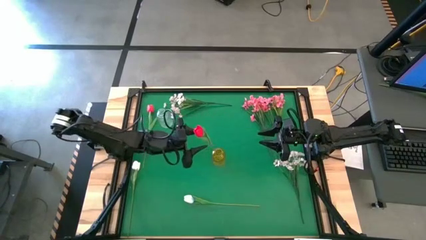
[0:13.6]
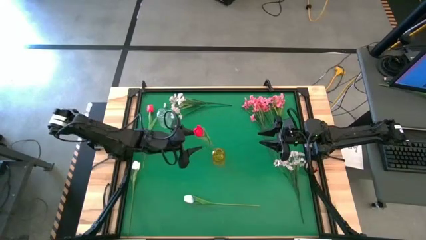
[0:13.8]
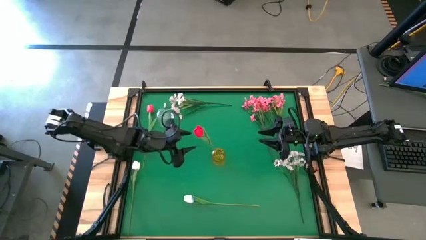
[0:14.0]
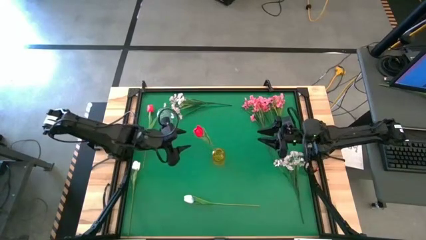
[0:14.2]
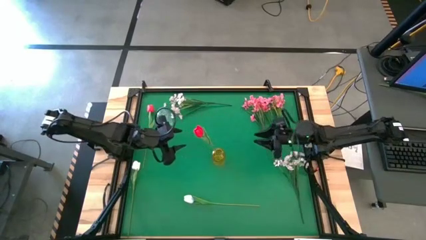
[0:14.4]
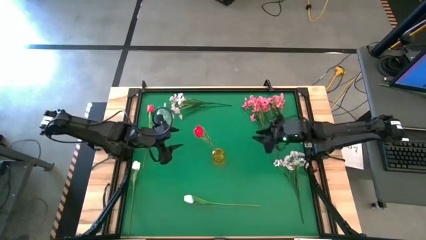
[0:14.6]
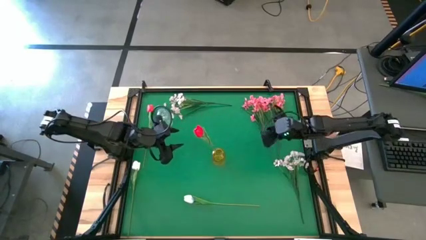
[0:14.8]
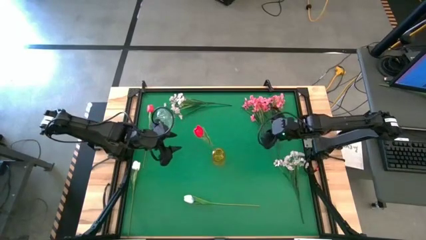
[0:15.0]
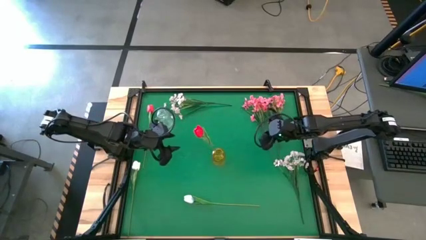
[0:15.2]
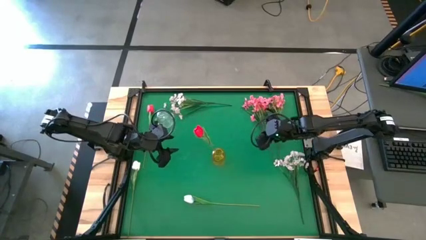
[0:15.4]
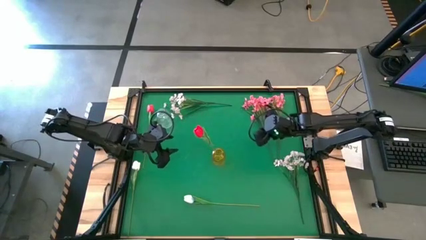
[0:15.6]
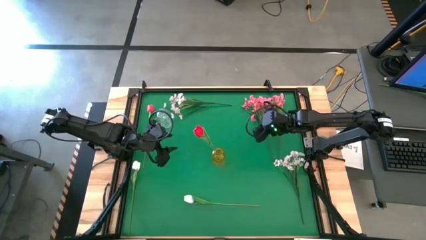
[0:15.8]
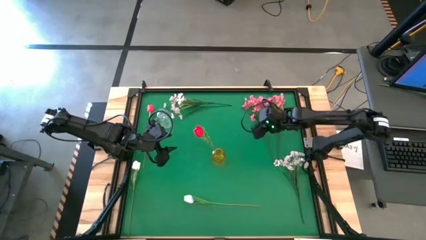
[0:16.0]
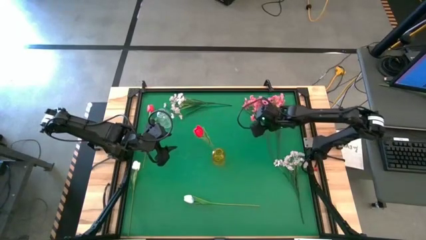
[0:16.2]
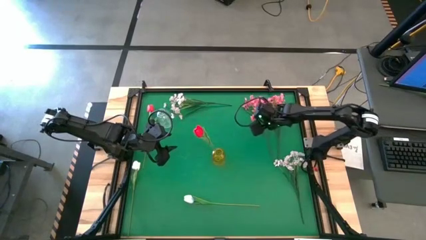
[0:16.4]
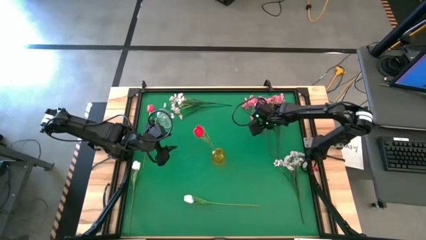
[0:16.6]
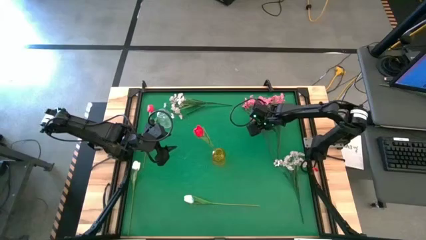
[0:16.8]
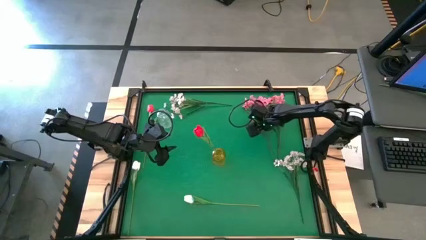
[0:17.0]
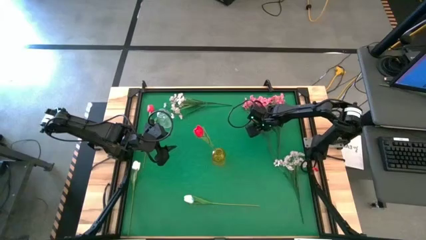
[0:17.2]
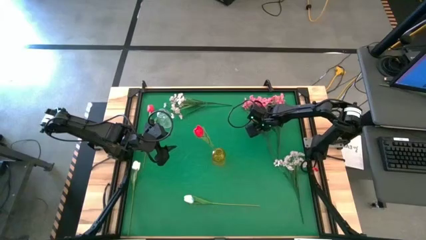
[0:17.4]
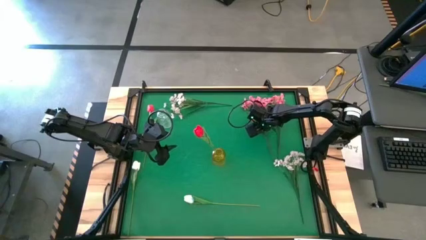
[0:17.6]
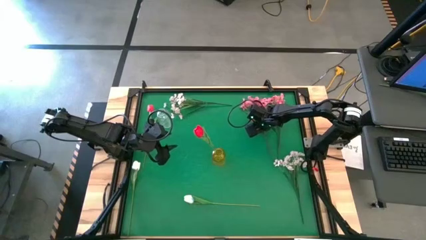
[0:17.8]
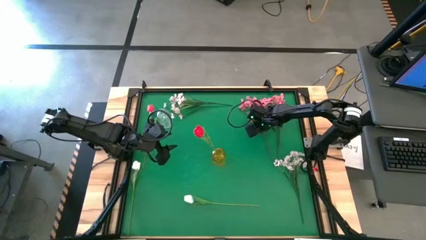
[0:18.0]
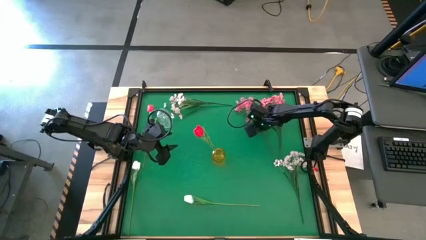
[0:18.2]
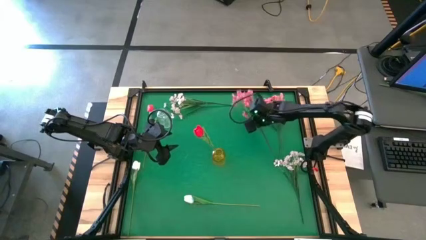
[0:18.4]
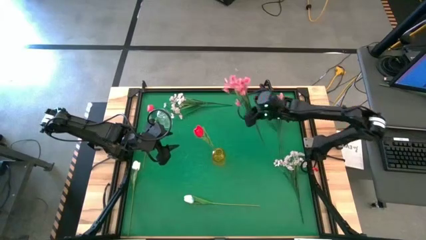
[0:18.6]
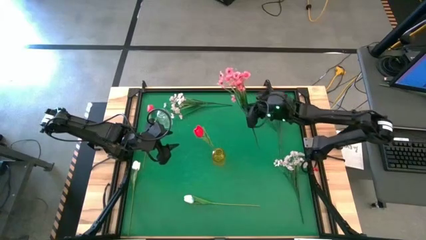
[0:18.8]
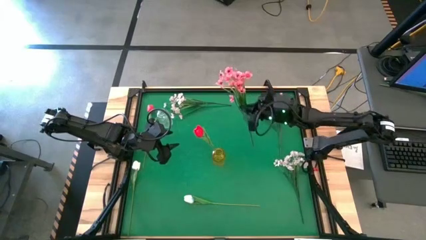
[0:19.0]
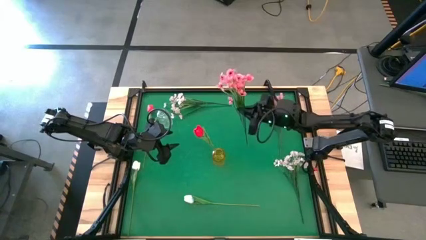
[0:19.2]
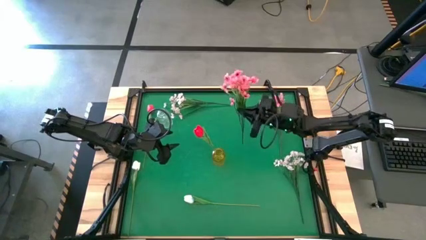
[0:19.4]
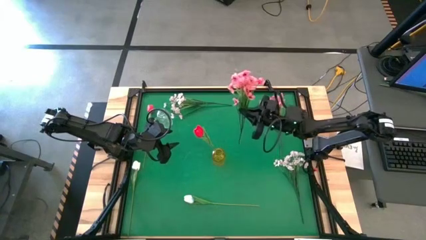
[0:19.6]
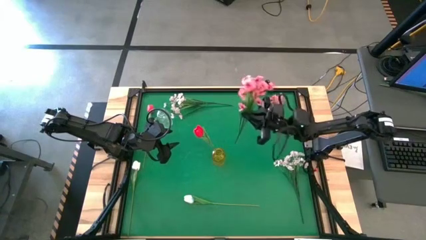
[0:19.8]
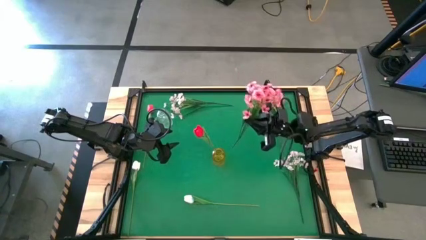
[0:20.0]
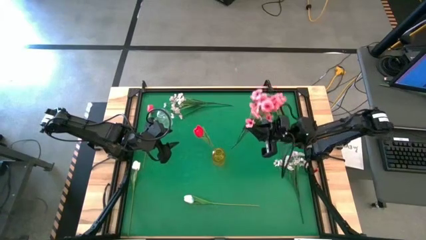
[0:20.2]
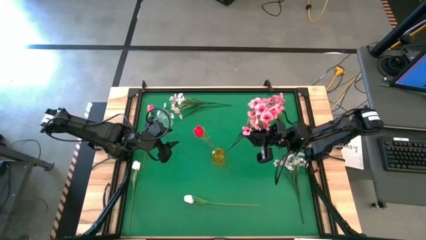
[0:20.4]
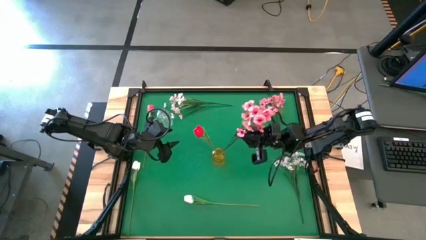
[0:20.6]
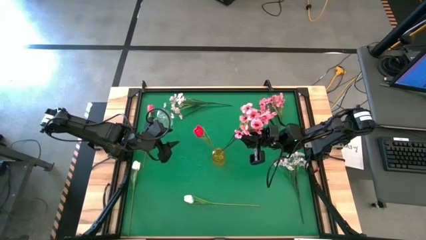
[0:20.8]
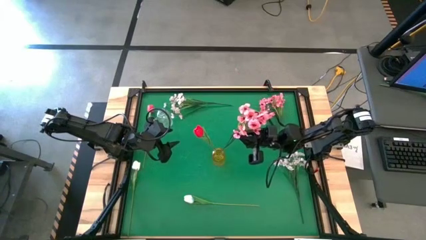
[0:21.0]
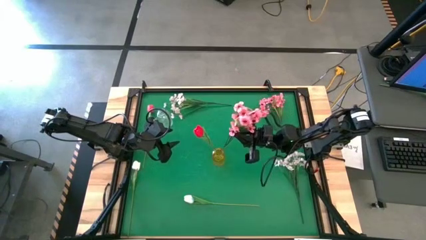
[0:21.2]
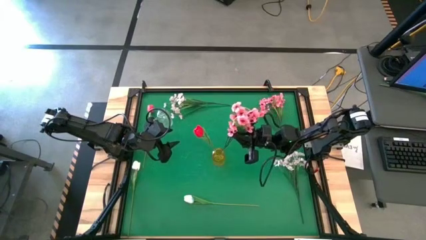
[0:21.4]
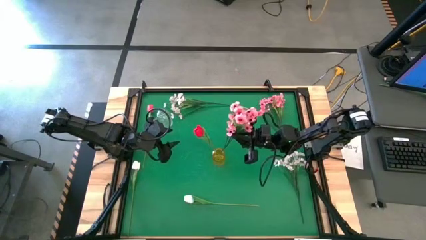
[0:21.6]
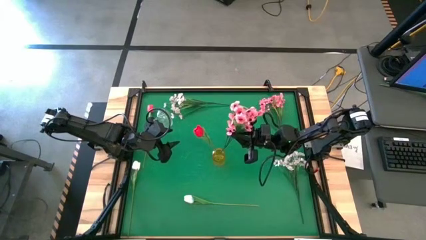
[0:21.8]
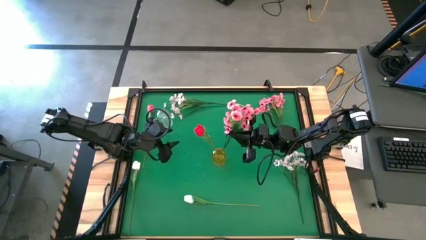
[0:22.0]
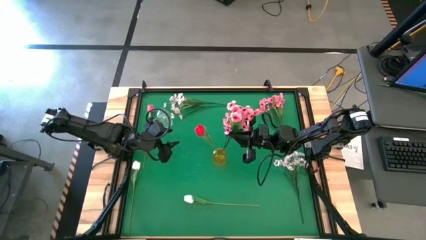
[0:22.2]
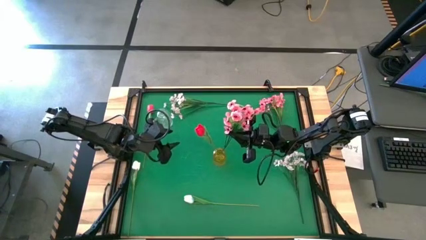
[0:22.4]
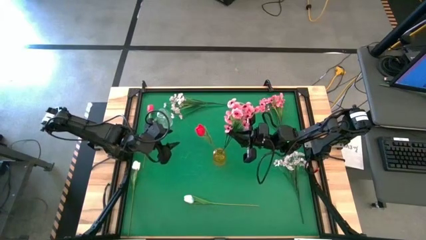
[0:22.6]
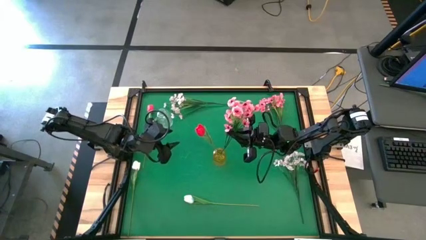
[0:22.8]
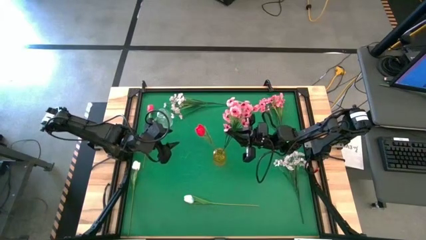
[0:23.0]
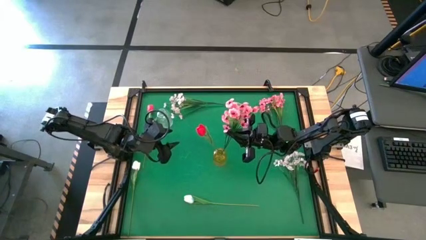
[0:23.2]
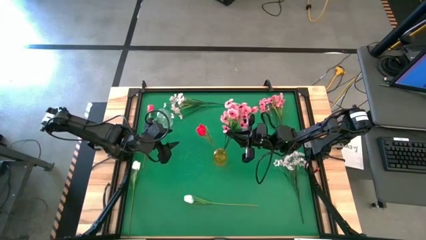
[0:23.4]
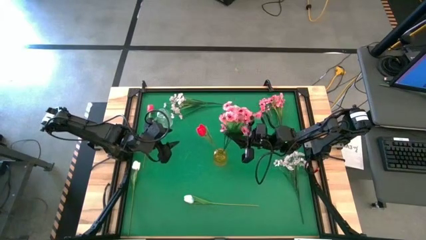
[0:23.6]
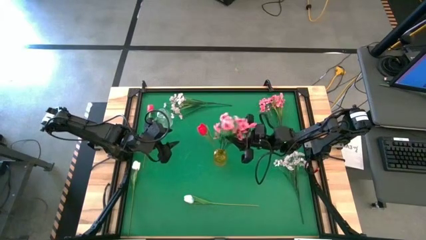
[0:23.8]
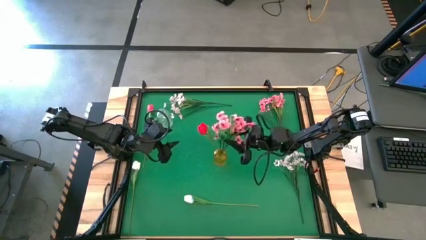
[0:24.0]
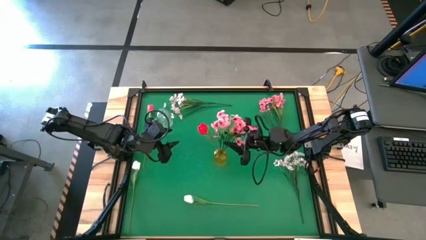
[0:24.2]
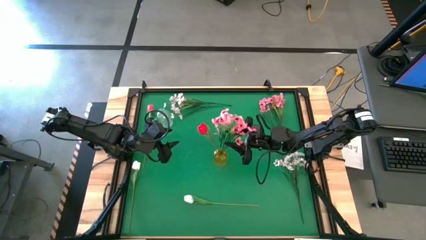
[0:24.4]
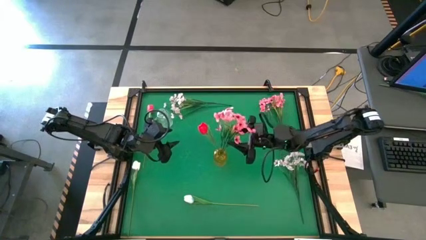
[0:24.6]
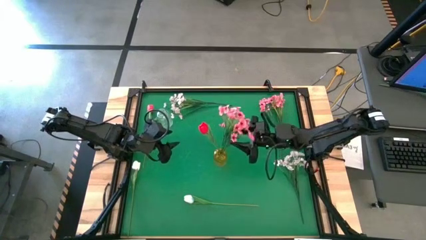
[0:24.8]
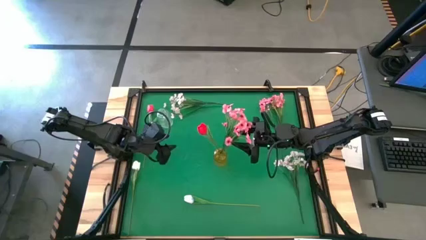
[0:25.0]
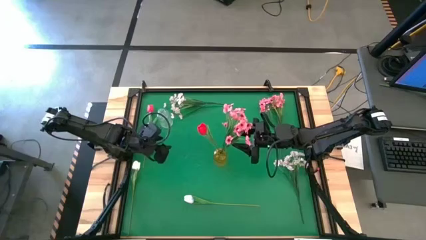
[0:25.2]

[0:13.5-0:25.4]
Task: Sort flowers into vase by color
Put the left pink flowers into the yellow vase
